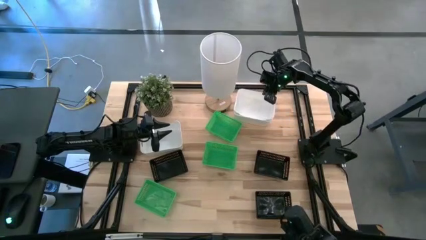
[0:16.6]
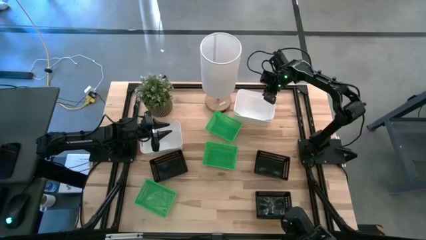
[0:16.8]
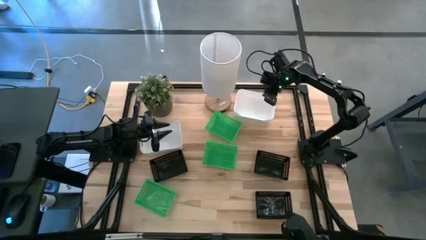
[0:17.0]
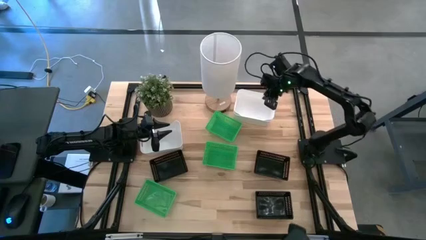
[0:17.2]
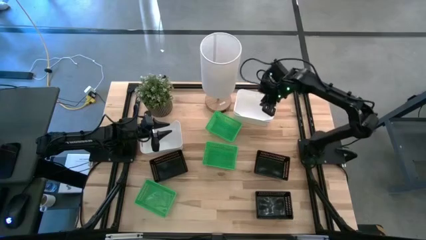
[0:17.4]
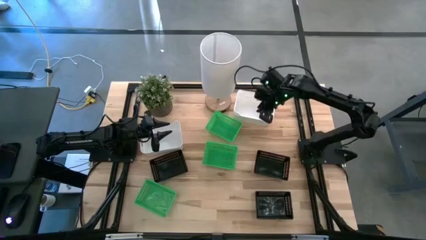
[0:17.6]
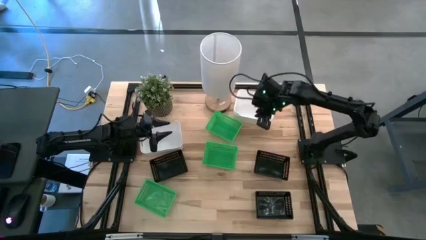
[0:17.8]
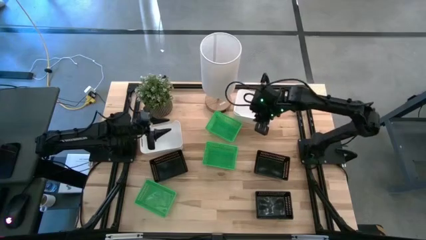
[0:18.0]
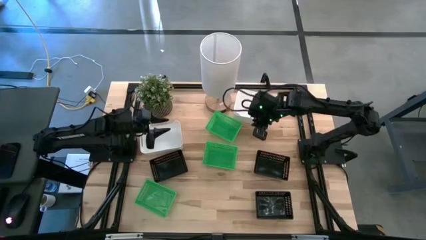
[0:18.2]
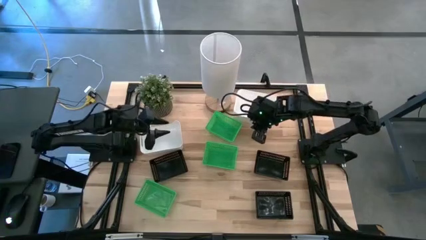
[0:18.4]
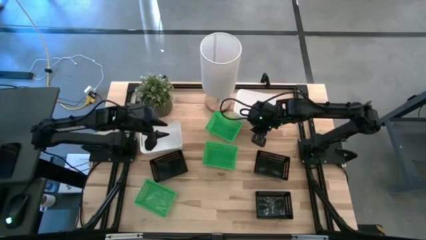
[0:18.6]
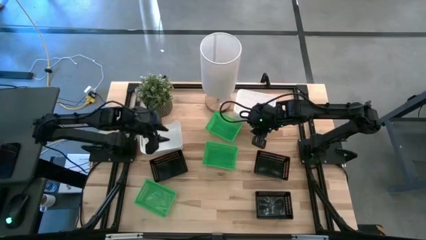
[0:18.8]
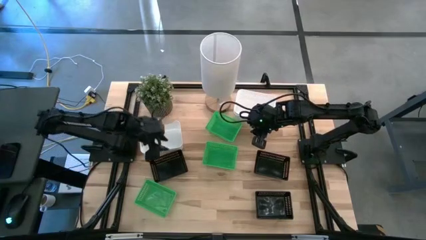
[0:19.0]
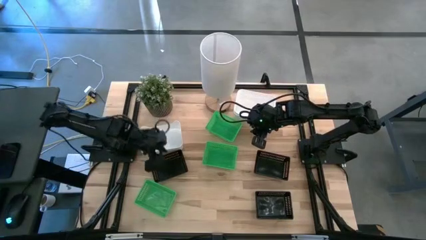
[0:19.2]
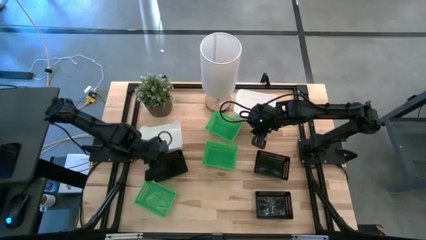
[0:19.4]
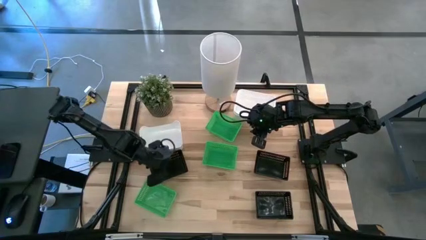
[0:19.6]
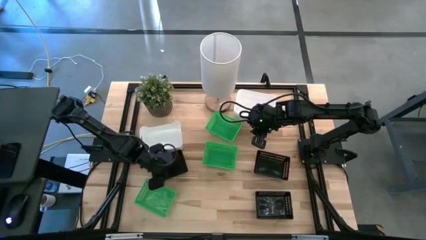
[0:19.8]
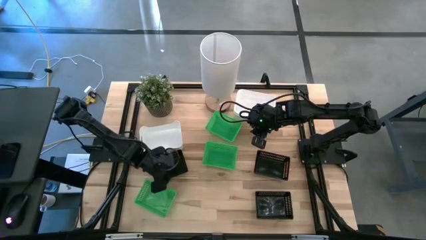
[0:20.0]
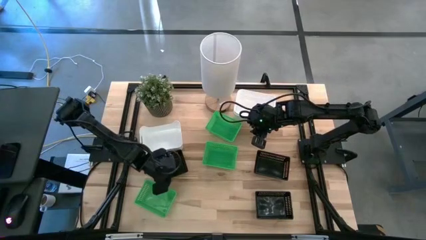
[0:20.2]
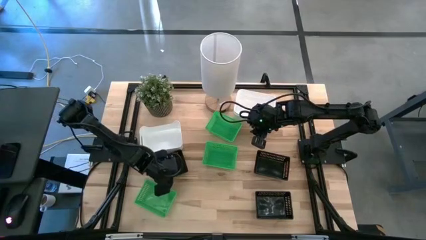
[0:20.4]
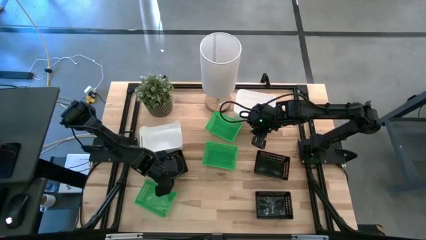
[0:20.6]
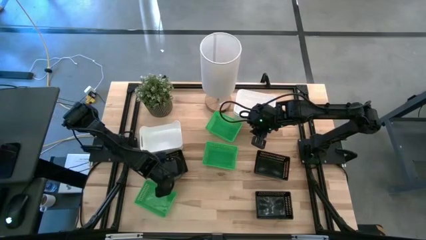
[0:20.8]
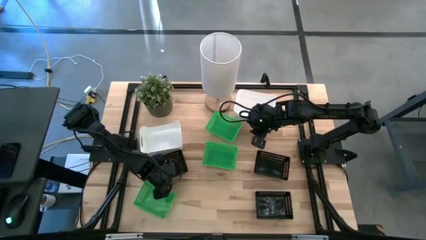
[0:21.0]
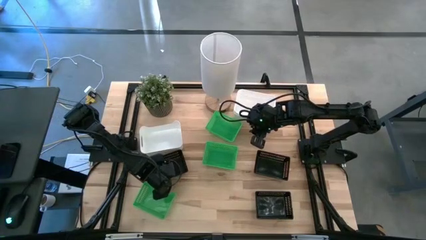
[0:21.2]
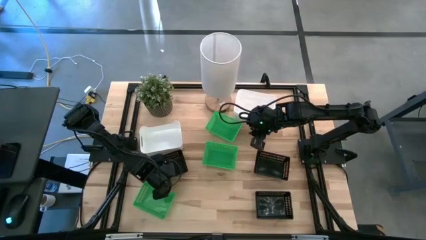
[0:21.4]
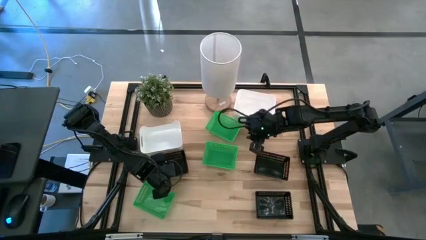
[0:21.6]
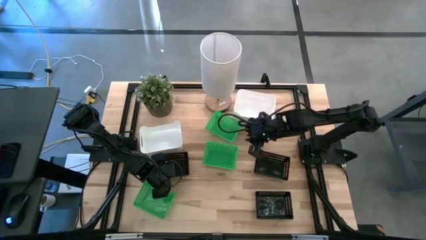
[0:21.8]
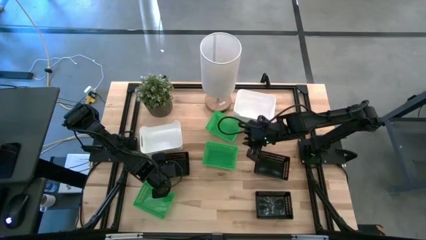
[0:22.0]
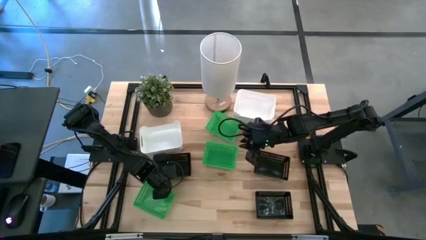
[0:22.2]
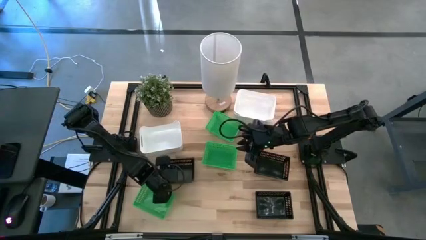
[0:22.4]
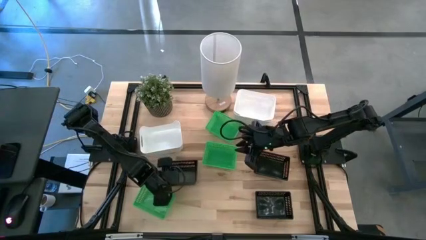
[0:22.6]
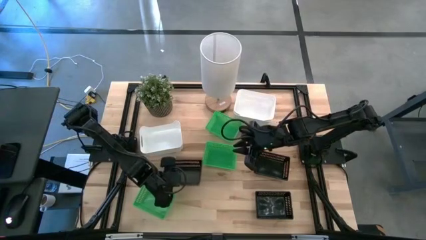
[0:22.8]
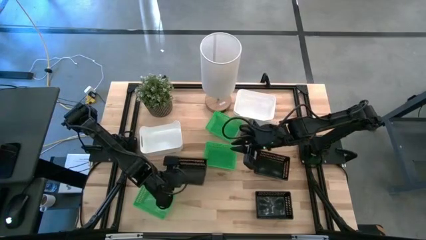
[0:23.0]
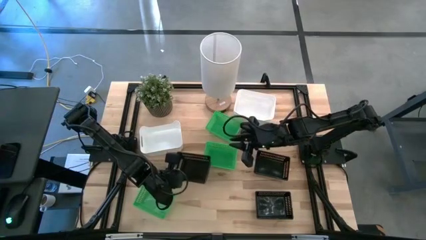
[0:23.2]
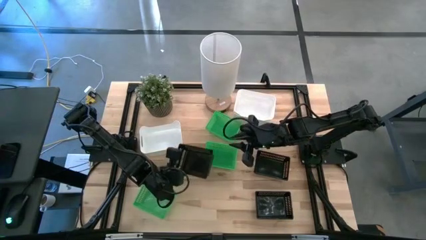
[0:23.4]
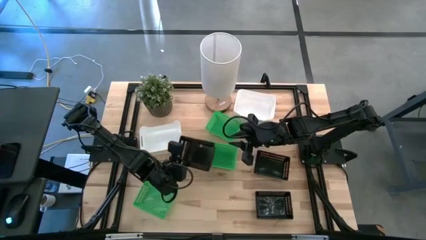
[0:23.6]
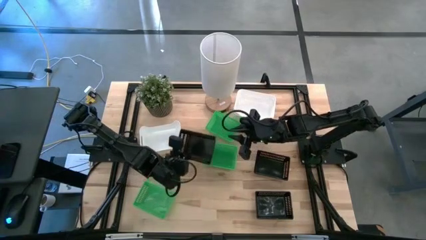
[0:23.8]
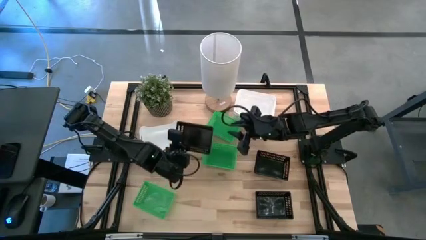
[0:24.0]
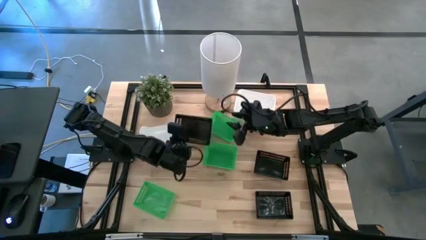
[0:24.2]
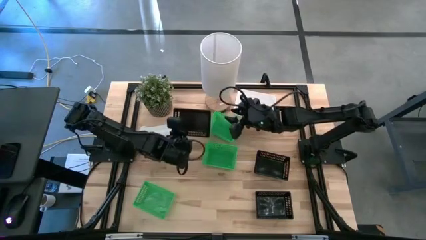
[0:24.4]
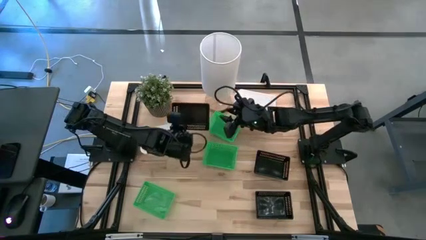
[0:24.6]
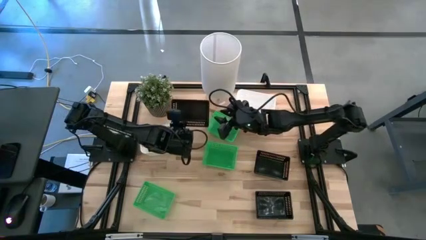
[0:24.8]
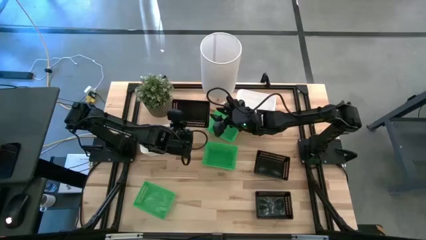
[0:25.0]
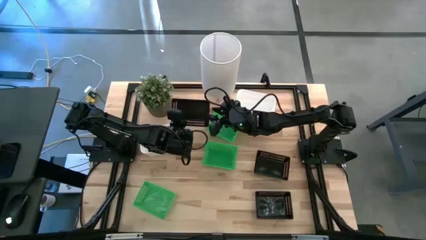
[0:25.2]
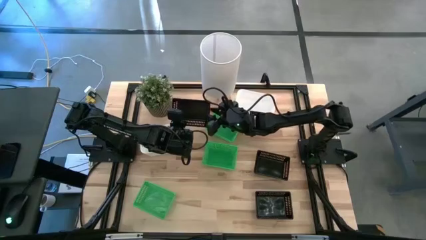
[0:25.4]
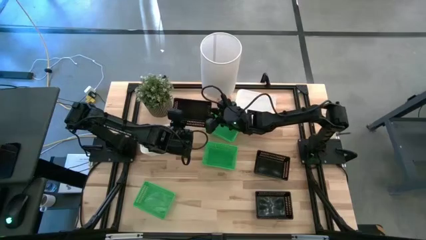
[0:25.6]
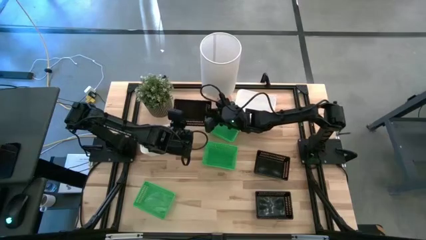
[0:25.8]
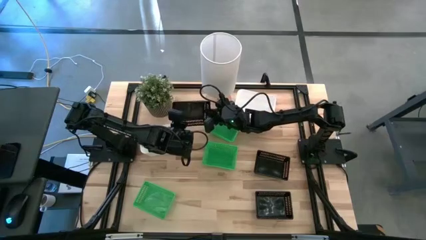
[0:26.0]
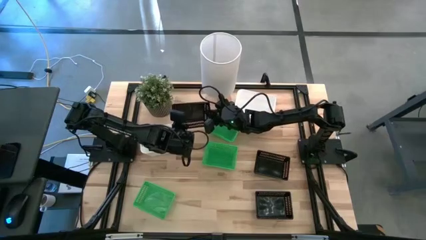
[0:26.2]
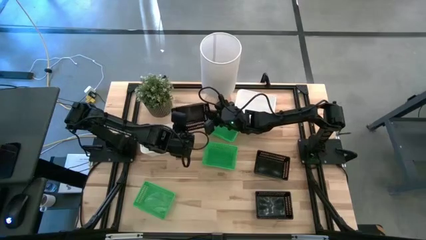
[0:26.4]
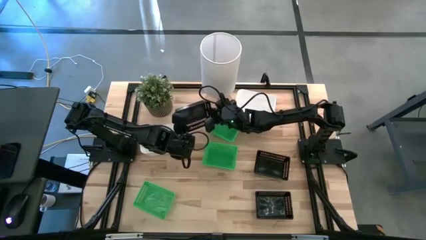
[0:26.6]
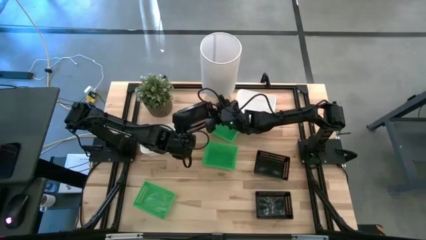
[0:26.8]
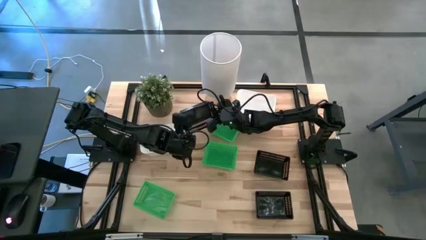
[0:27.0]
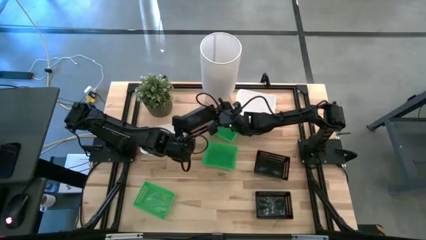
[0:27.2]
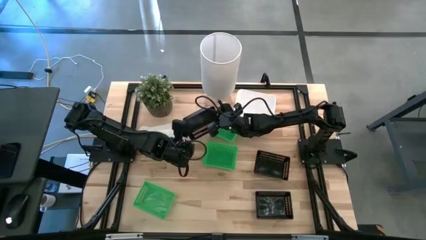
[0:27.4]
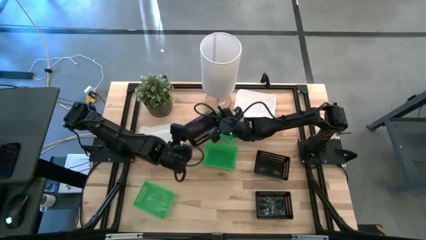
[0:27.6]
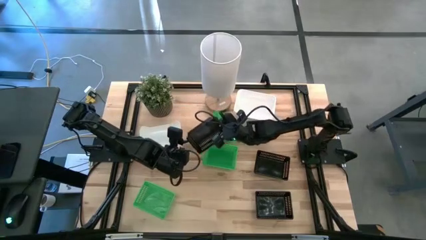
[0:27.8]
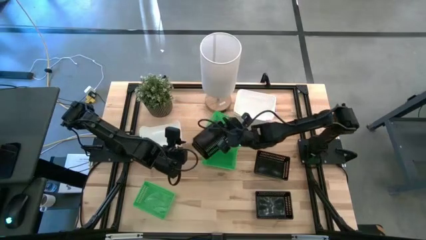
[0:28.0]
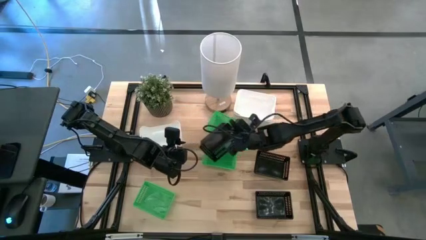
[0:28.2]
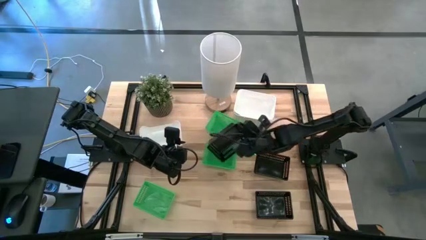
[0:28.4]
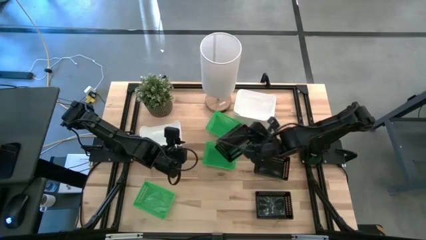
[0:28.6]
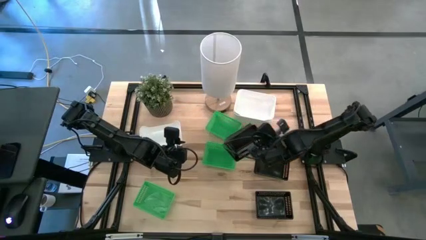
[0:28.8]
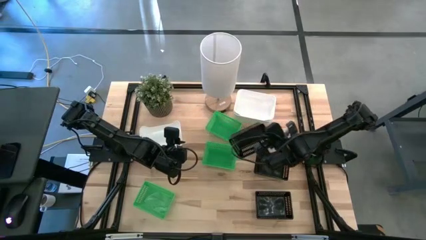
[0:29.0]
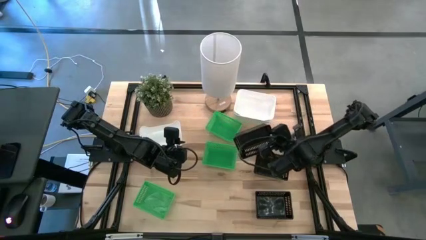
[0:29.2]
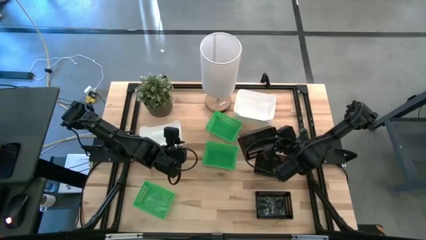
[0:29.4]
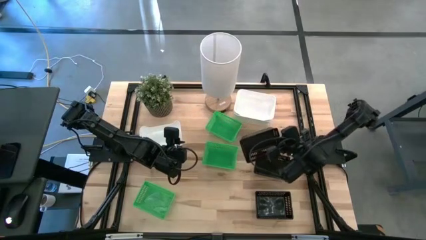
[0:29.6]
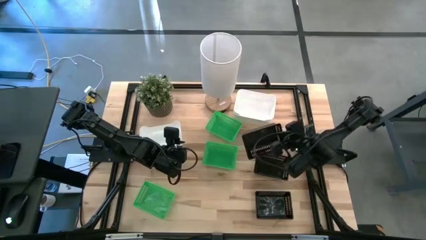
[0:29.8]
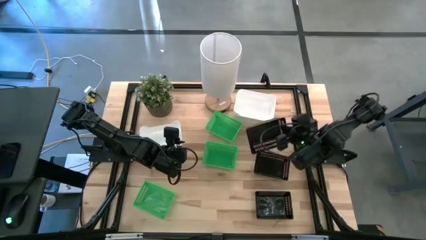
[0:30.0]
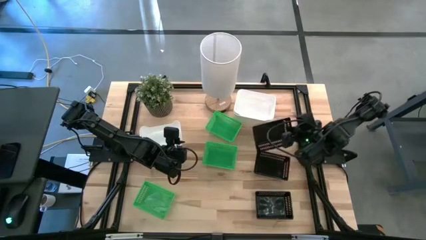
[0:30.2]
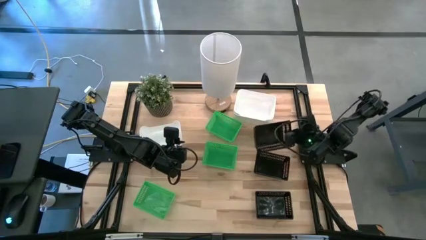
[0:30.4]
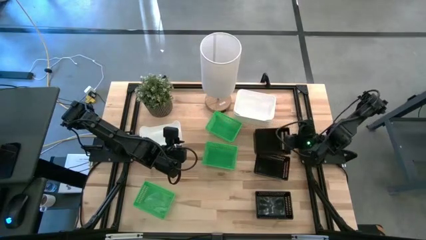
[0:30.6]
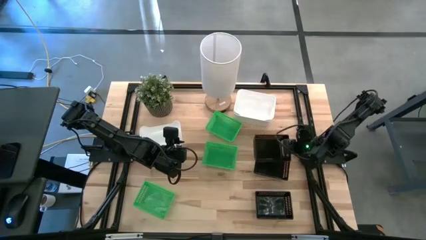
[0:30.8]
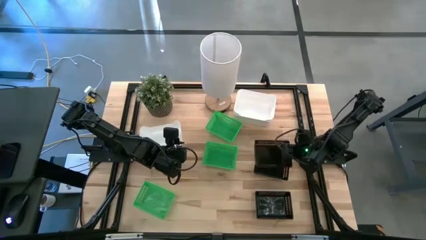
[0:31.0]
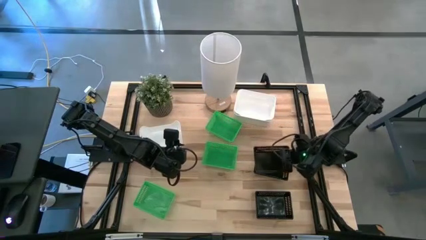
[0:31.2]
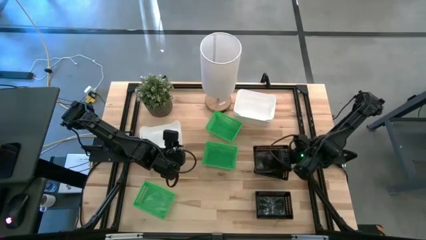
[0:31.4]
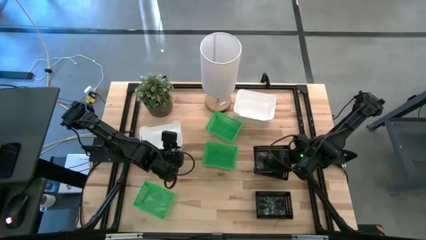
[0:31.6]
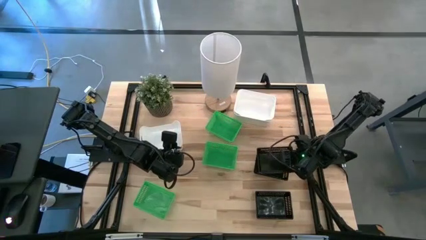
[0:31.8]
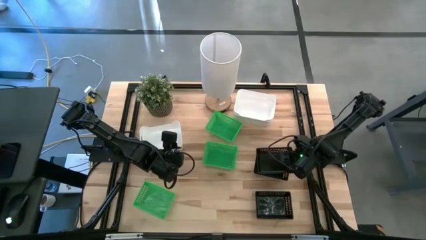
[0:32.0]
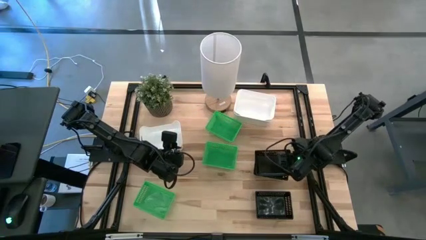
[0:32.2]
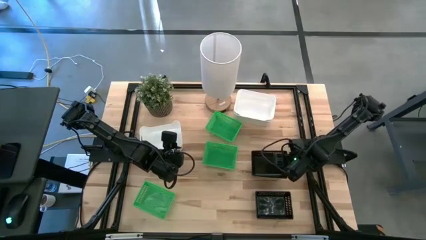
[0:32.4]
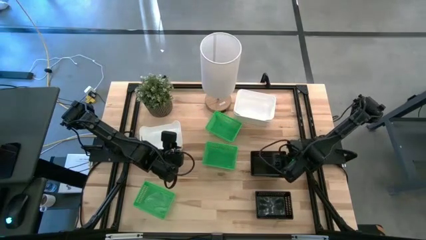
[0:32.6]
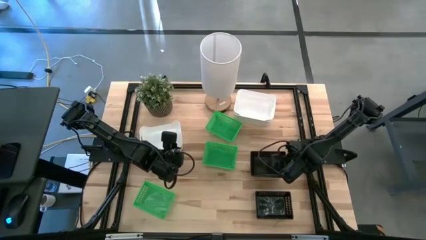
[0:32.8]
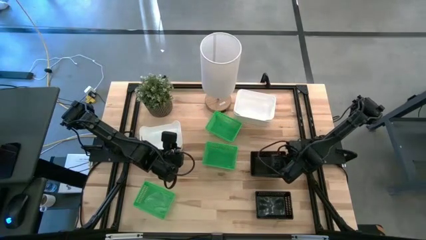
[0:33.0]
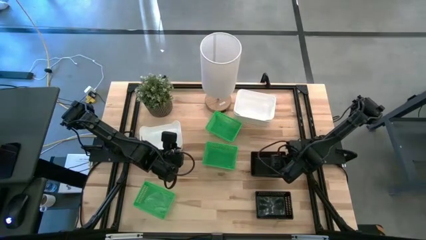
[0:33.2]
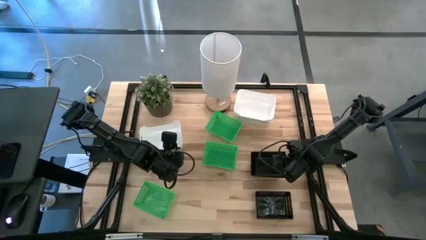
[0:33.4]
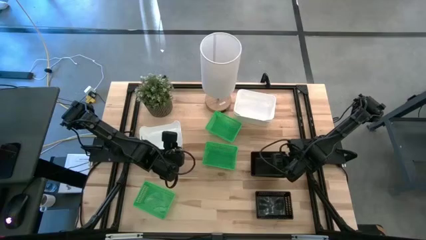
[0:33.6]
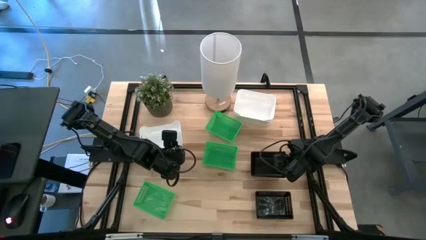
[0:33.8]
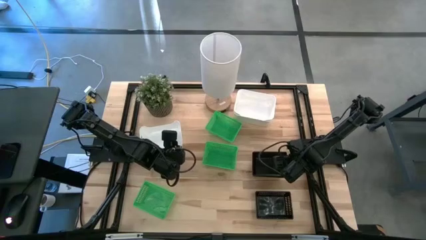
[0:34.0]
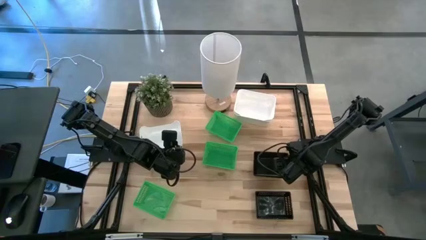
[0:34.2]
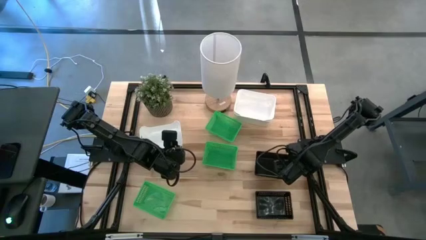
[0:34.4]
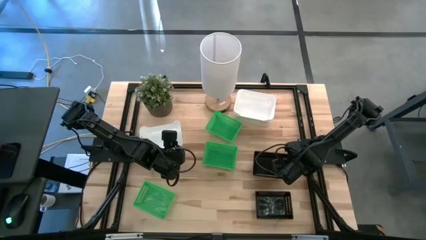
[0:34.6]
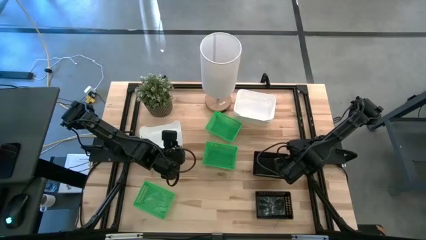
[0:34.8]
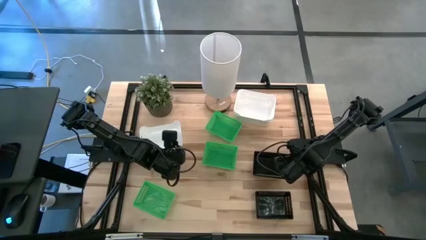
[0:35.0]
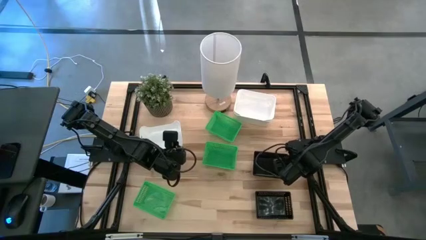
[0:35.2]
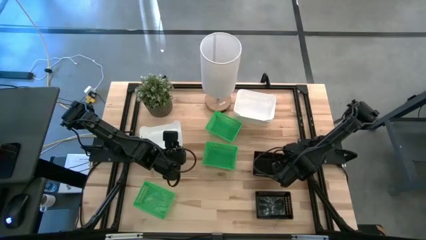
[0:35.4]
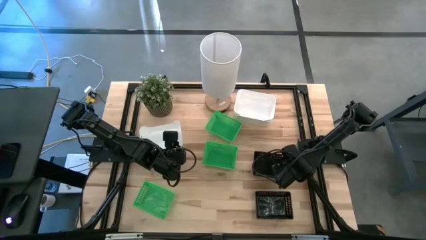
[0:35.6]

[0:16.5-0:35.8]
Stack the top left black bin on top of the top right black bin
